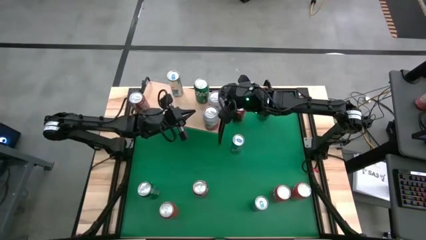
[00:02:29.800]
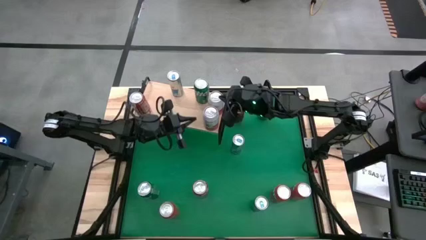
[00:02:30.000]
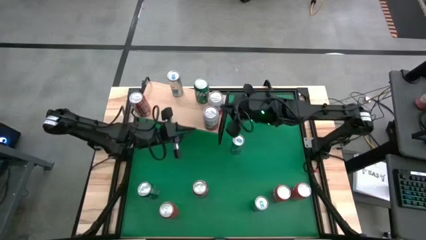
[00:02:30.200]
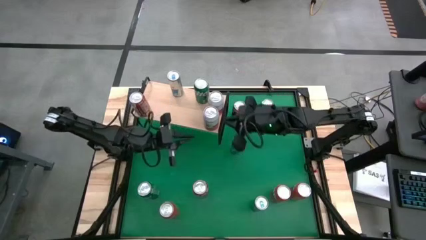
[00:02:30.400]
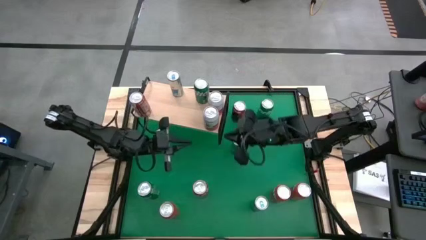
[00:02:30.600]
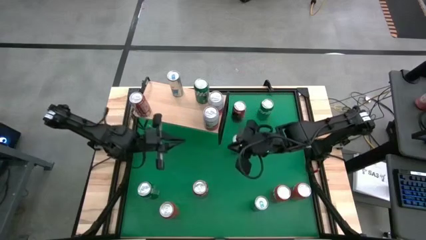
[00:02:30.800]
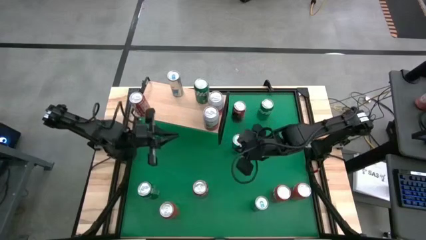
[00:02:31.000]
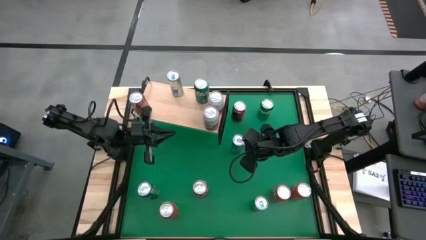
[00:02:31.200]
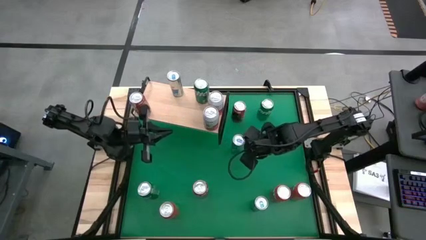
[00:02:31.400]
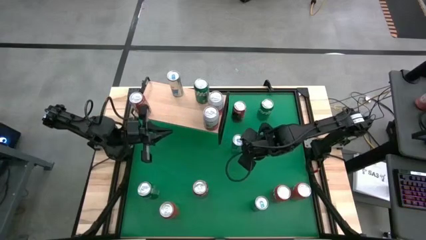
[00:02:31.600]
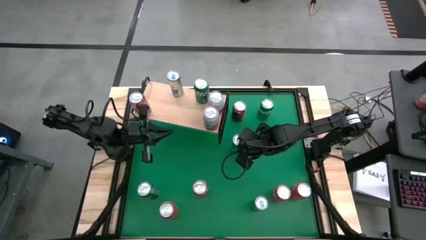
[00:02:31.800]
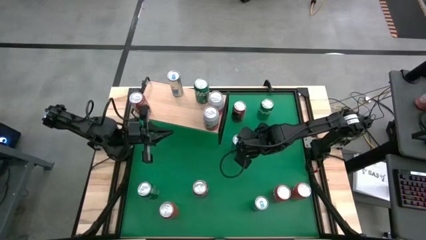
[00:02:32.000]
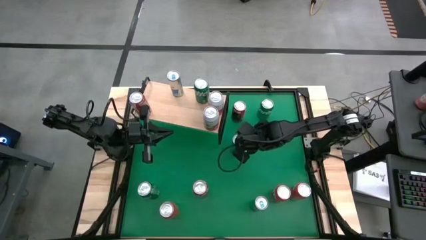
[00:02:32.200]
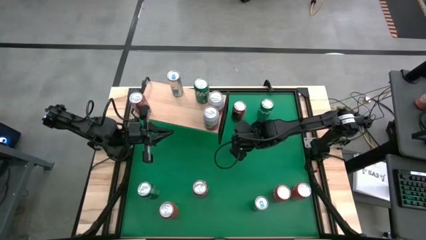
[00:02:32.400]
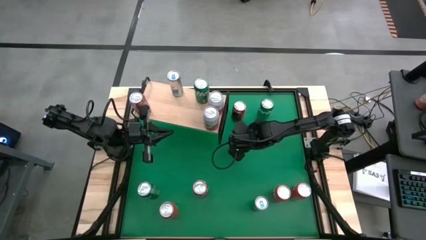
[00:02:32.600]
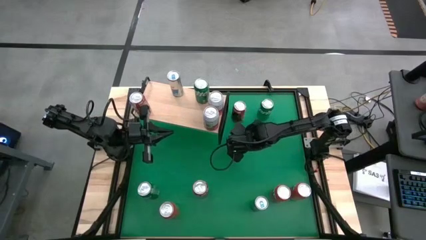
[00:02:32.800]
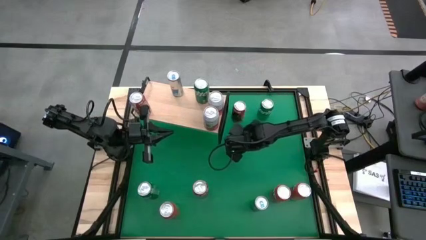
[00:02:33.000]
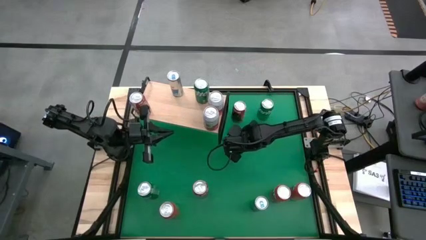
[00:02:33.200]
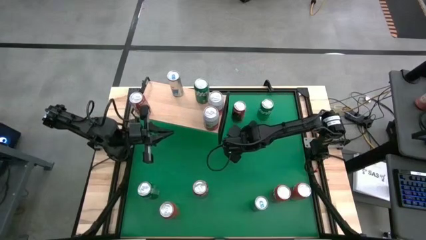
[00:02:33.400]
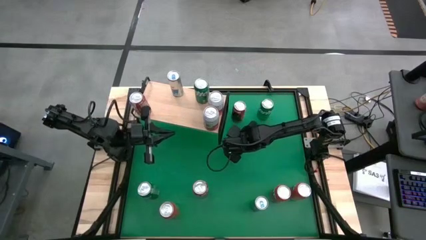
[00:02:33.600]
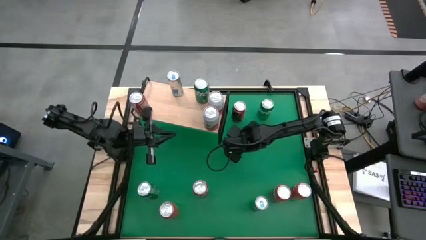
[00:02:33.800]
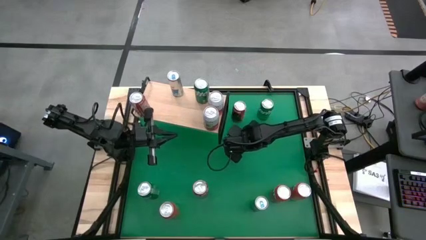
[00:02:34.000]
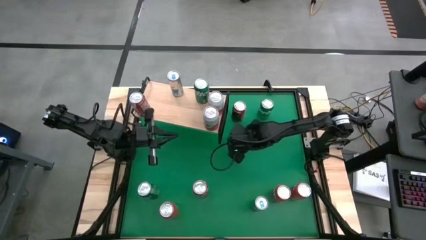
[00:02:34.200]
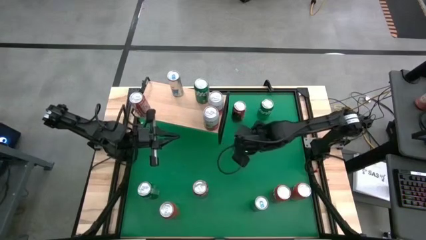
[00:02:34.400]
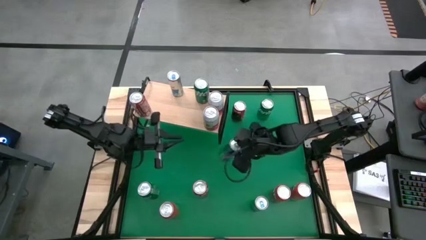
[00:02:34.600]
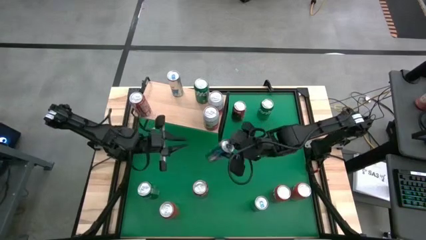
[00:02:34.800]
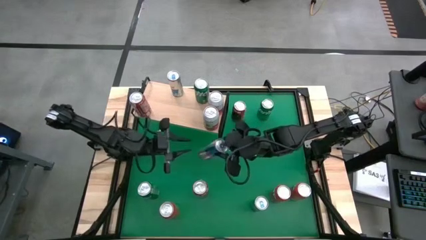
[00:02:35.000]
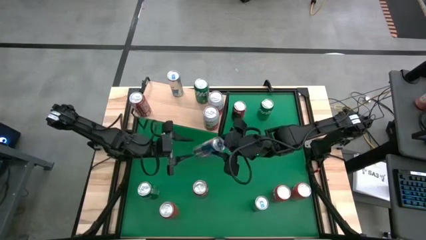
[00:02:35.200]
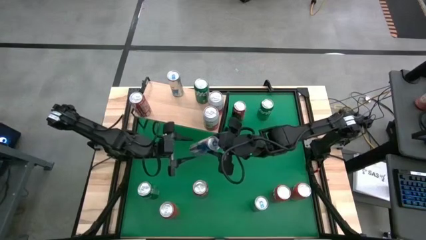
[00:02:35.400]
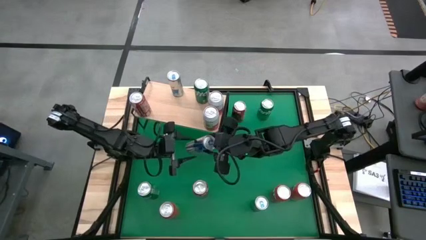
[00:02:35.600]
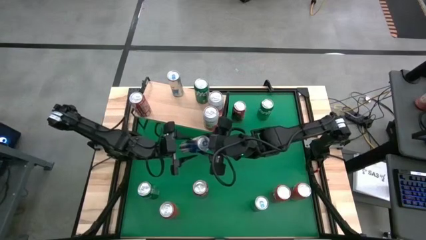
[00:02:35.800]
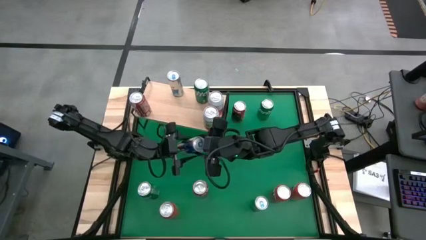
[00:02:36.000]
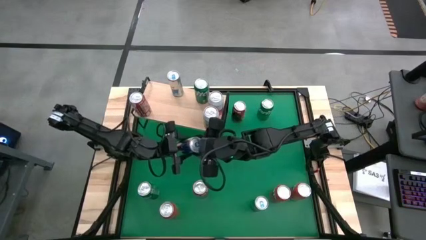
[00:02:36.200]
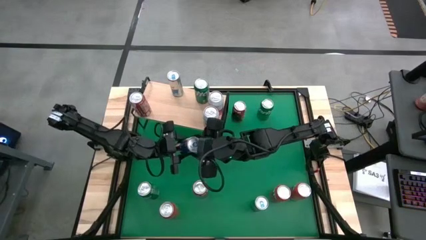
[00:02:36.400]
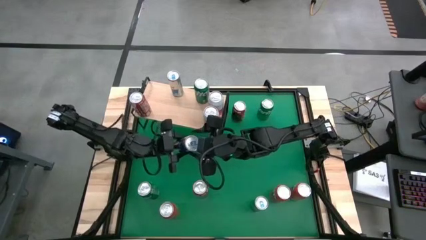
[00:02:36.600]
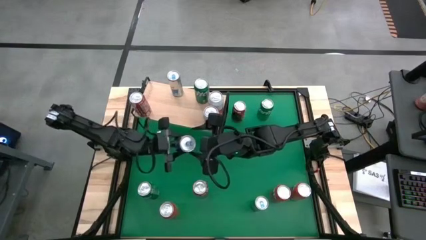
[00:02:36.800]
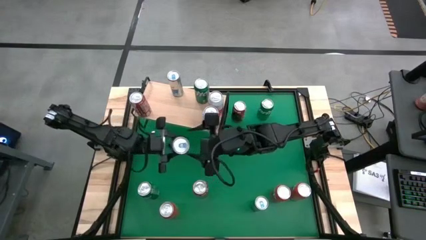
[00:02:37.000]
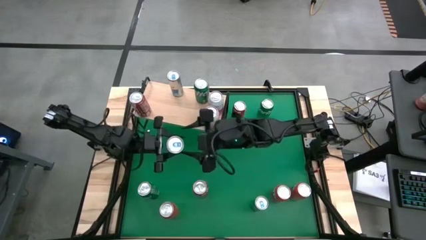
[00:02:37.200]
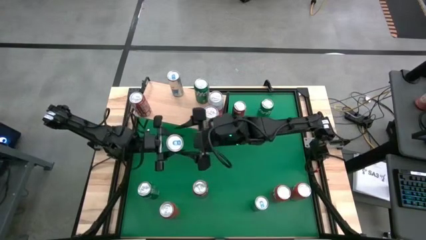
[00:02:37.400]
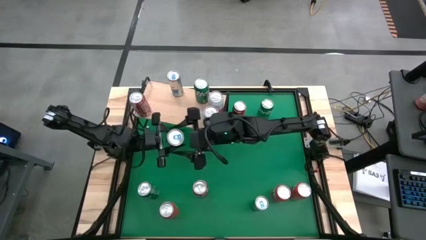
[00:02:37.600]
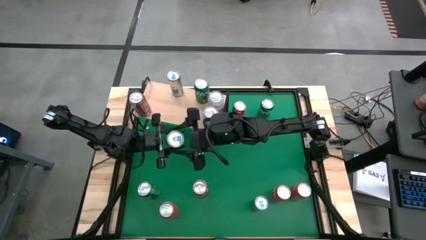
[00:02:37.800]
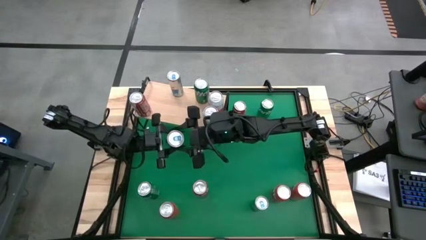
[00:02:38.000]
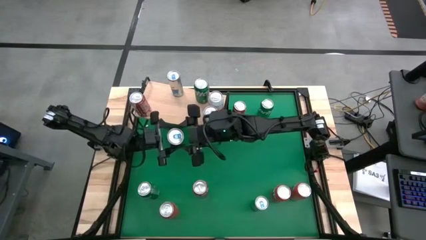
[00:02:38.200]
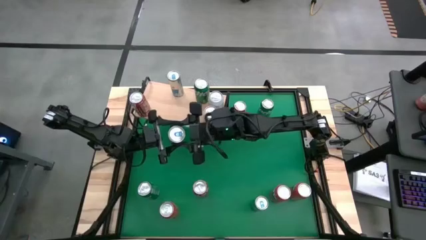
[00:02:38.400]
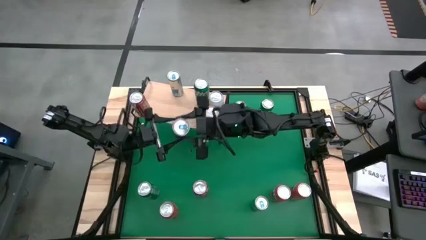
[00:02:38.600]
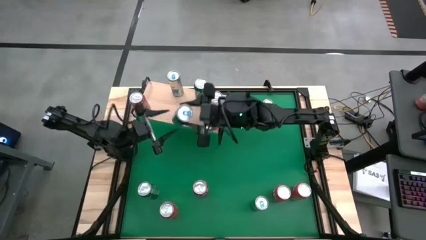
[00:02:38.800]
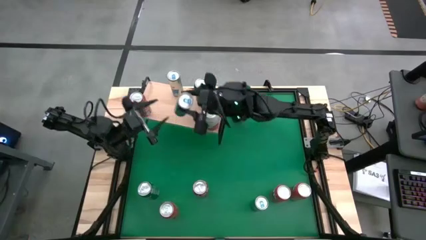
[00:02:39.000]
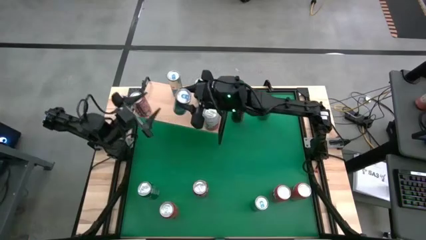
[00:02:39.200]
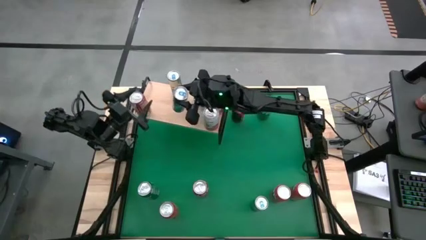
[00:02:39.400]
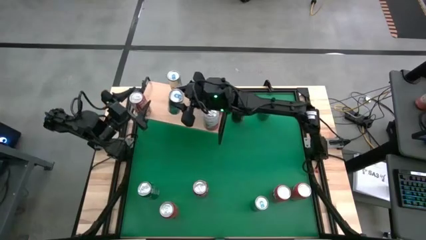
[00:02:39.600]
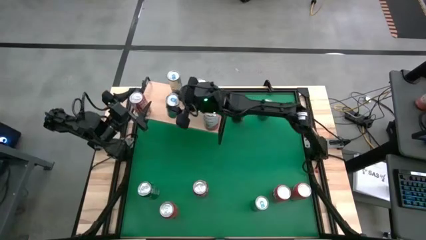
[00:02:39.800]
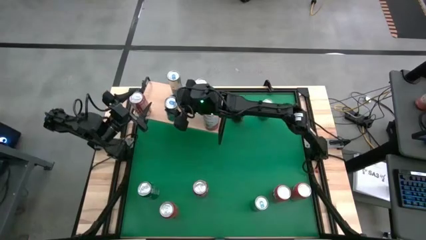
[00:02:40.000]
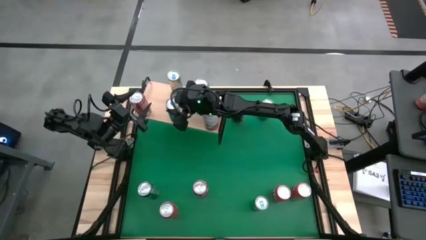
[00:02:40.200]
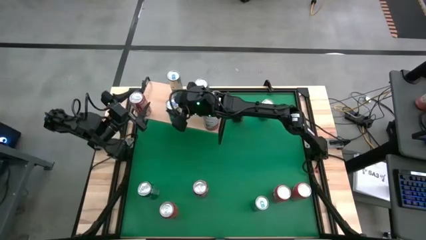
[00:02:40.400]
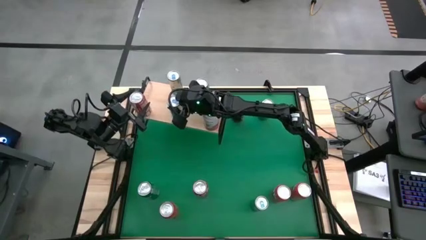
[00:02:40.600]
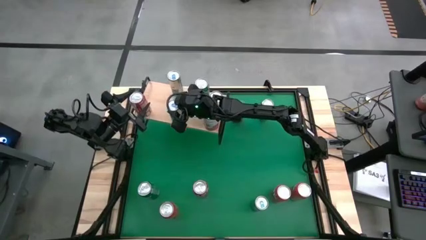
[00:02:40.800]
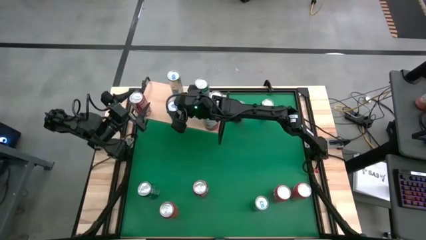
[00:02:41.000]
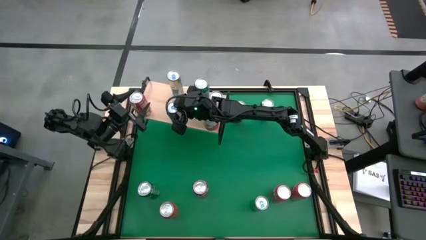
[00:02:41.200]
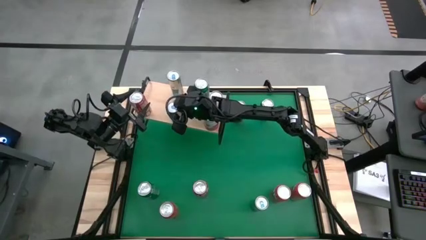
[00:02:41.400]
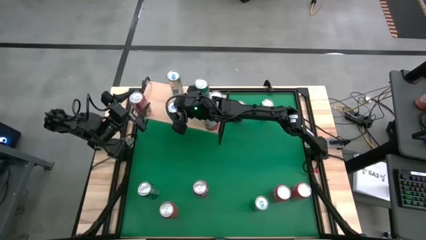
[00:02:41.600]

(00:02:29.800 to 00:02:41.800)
Task: Place canned beverage on shelf
Put the blue/white soda can on the shelf aligned with the other blue/white soda can

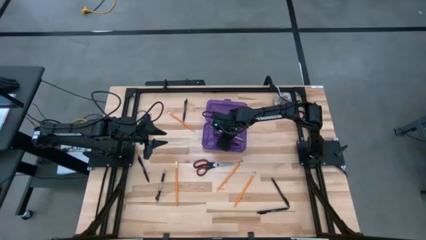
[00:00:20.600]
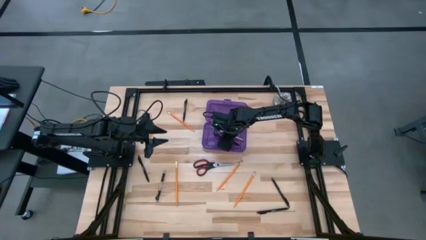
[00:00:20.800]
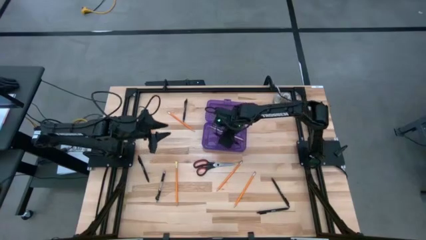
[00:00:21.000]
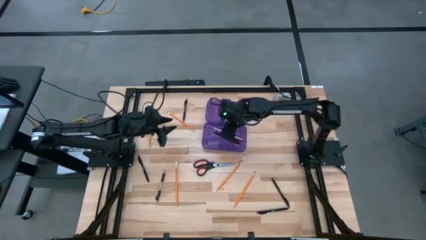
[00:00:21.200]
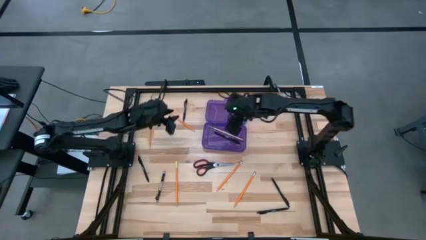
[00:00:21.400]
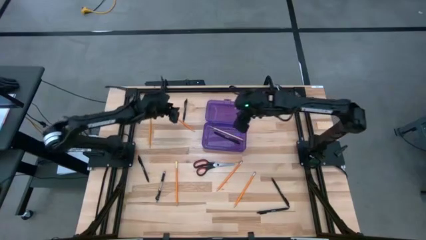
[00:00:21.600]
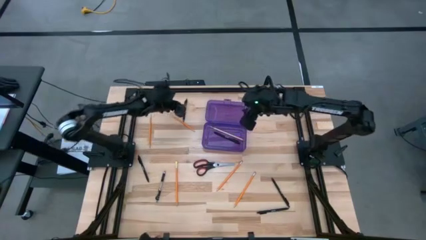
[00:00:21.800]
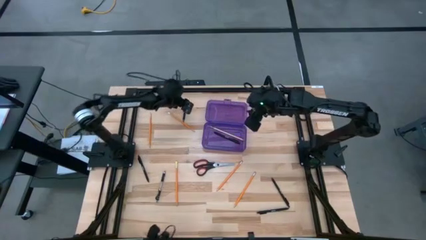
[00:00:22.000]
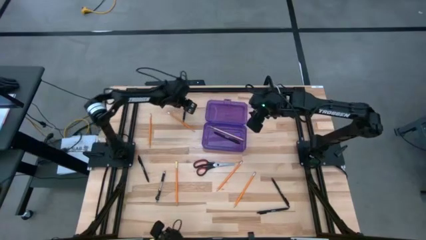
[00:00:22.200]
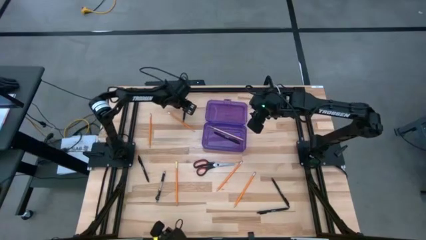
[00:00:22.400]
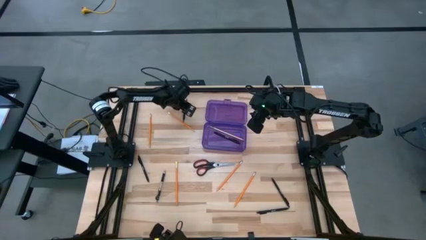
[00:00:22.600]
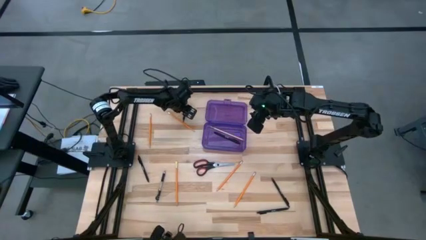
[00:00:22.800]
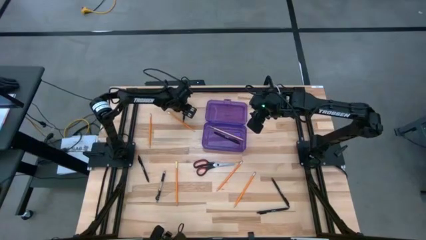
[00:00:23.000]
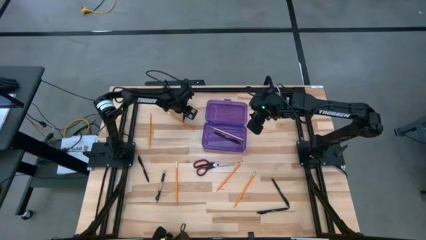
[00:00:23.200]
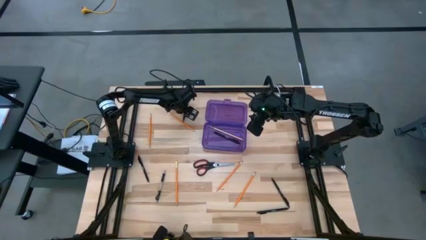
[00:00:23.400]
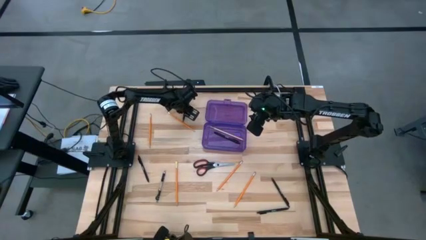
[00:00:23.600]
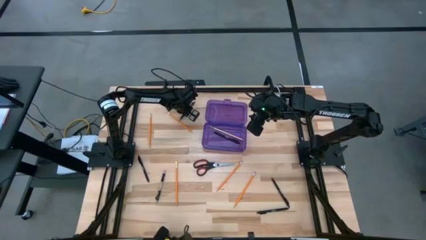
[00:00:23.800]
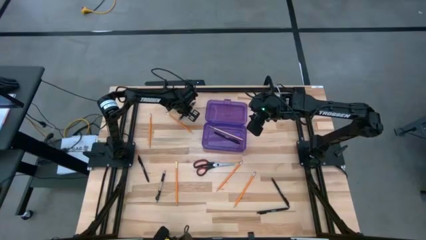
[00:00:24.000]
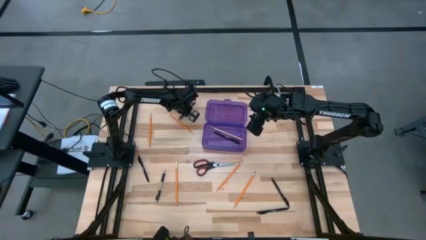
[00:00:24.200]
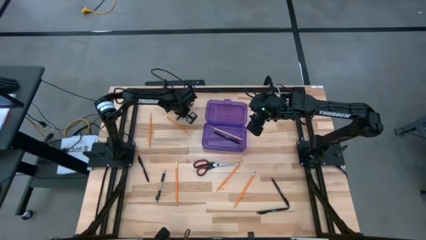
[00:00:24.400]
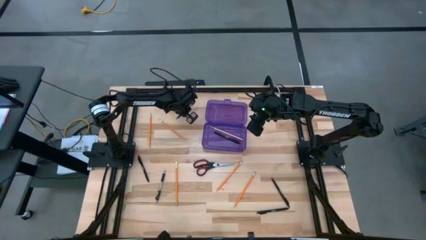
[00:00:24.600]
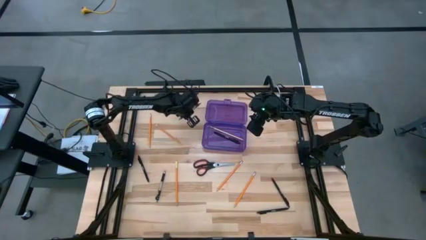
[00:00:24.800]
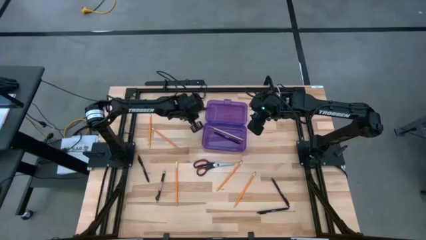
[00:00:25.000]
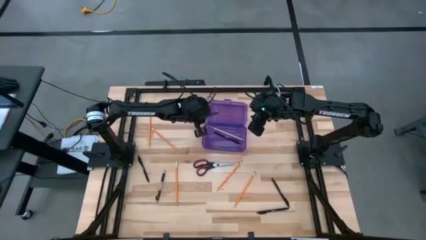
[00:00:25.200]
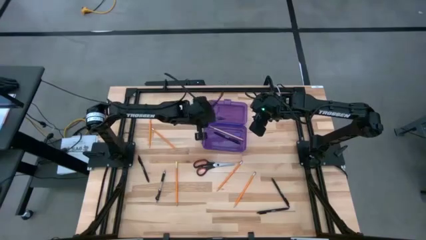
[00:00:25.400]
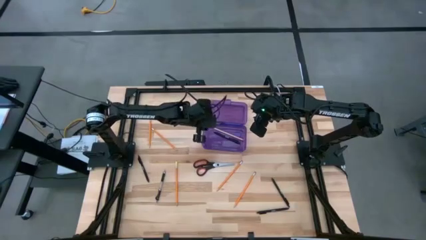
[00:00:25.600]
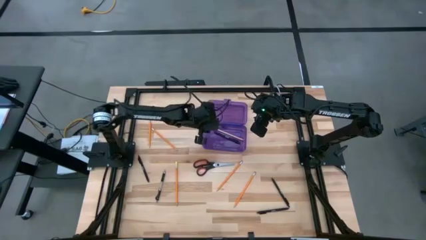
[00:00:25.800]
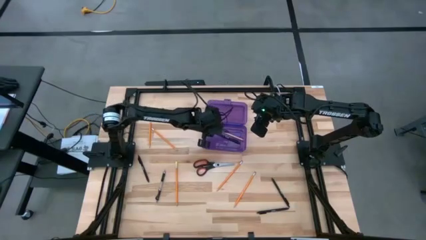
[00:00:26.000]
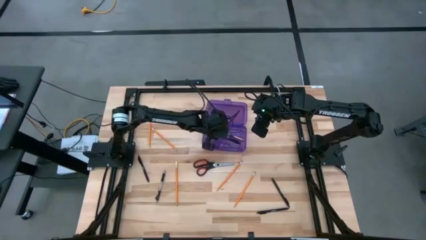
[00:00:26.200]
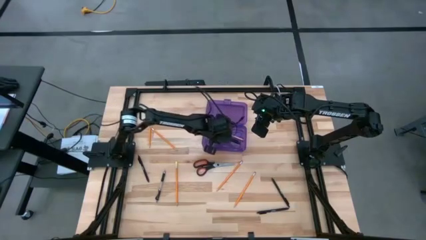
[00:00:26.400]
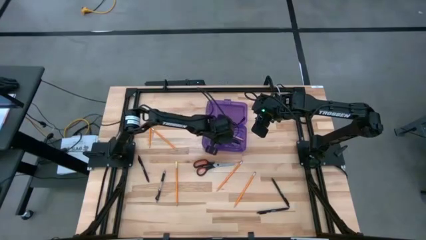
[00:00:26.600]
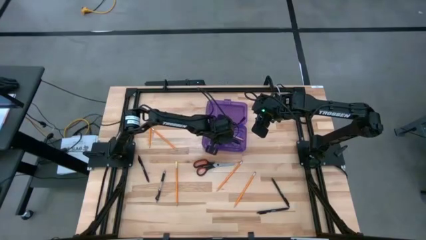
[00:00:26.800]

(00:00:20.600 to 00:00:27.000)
Task: Pick & place school supplies into a supply box
Put the black pen into the pencil box
